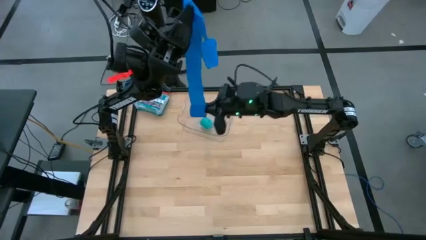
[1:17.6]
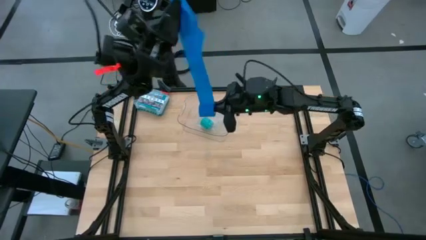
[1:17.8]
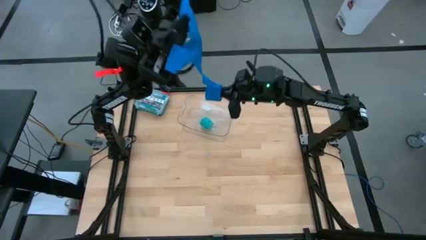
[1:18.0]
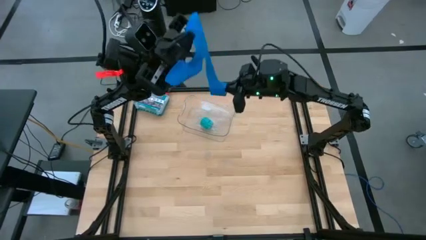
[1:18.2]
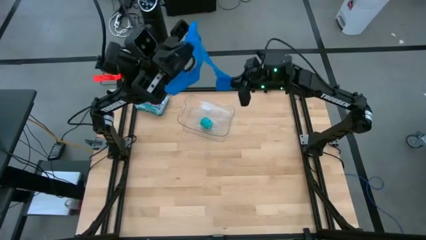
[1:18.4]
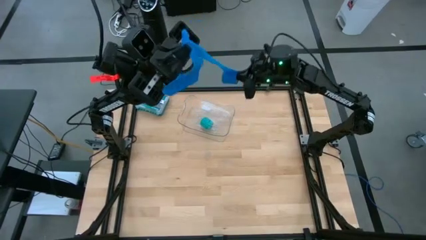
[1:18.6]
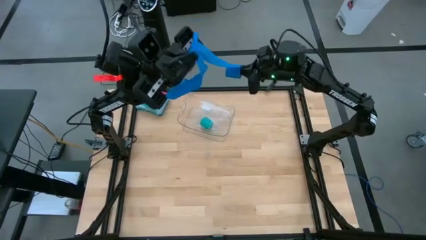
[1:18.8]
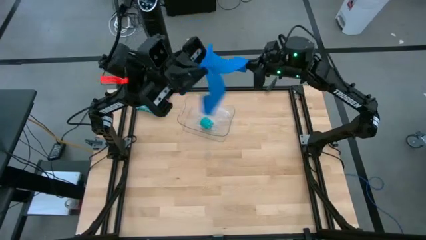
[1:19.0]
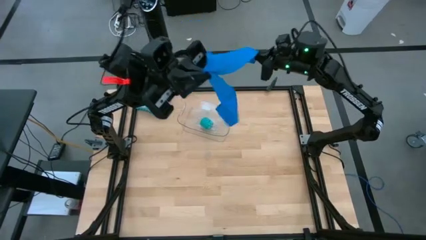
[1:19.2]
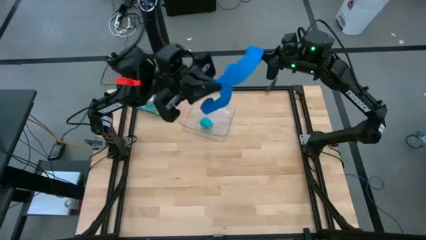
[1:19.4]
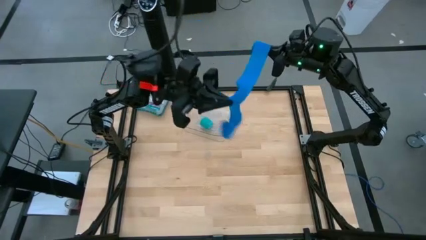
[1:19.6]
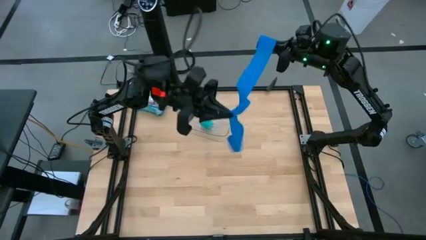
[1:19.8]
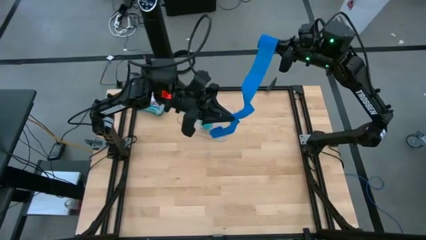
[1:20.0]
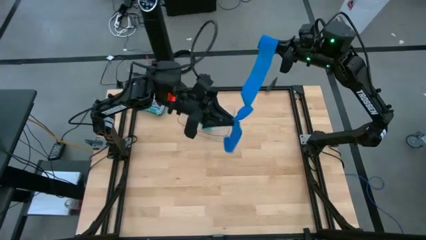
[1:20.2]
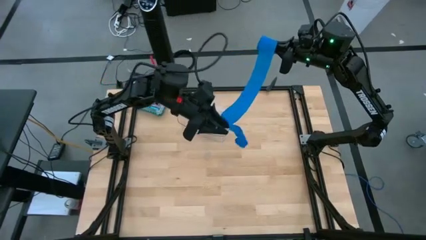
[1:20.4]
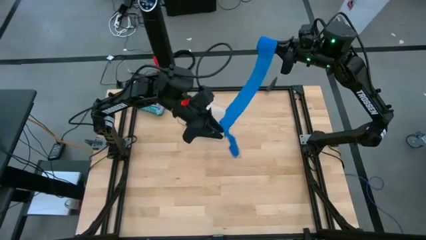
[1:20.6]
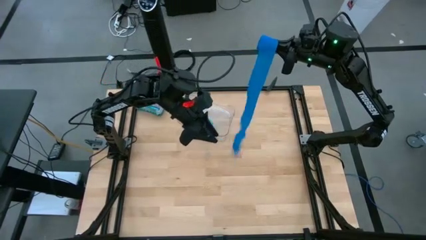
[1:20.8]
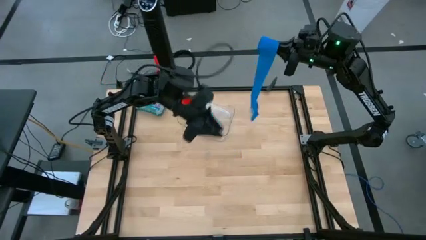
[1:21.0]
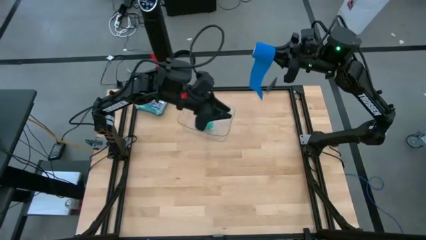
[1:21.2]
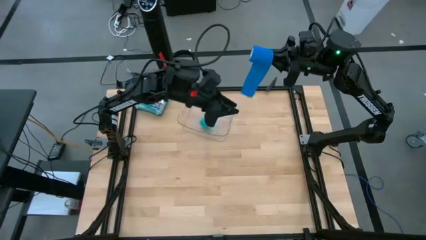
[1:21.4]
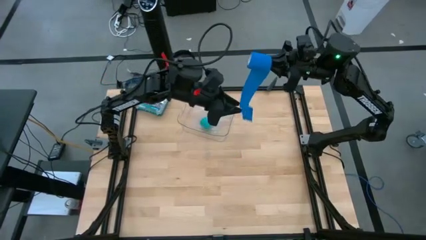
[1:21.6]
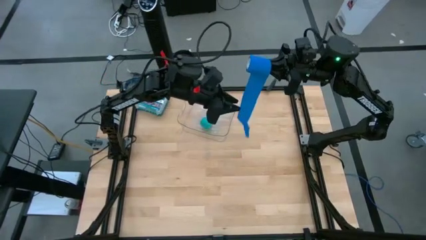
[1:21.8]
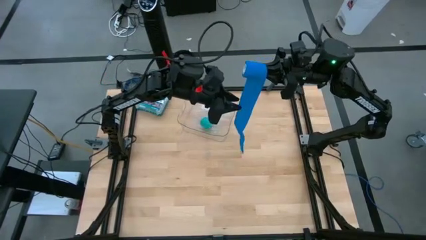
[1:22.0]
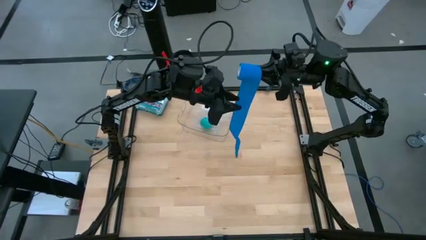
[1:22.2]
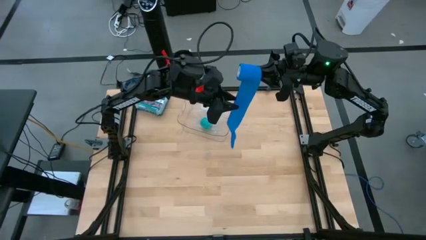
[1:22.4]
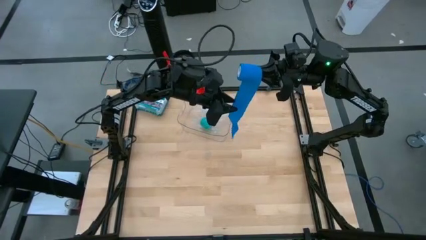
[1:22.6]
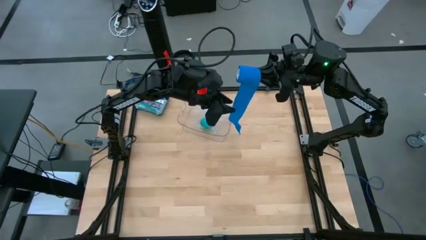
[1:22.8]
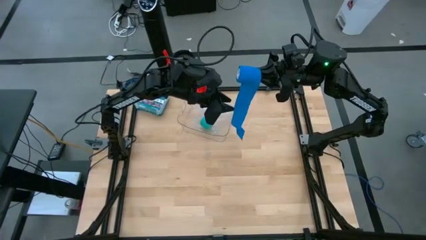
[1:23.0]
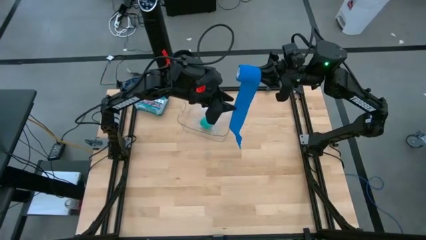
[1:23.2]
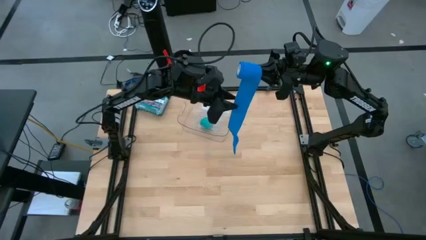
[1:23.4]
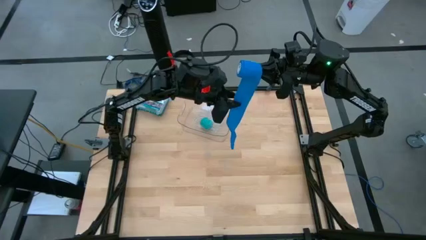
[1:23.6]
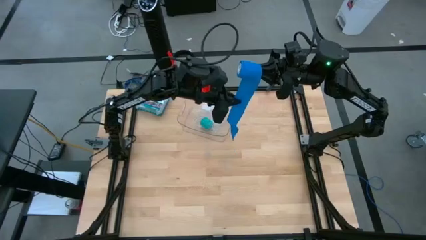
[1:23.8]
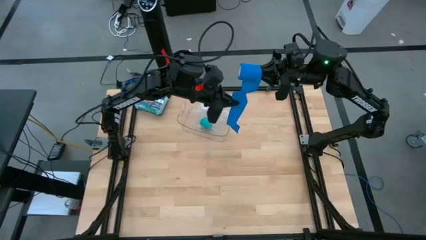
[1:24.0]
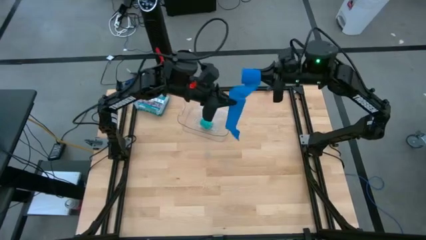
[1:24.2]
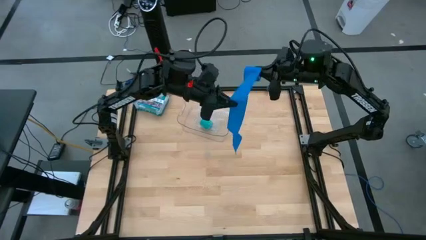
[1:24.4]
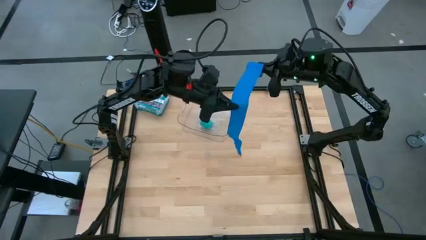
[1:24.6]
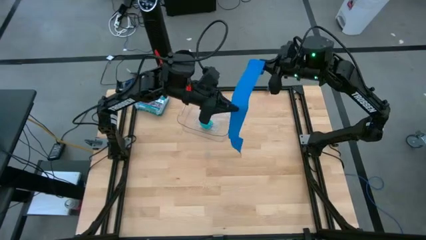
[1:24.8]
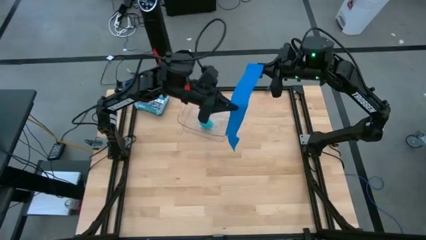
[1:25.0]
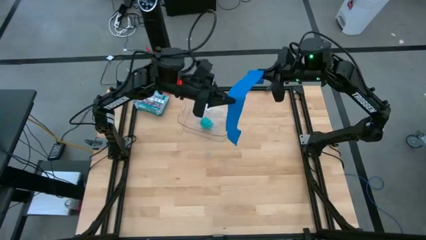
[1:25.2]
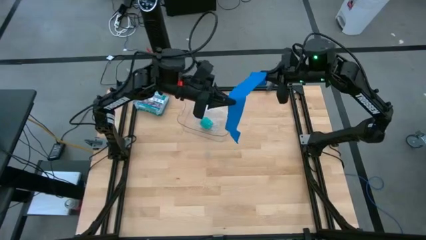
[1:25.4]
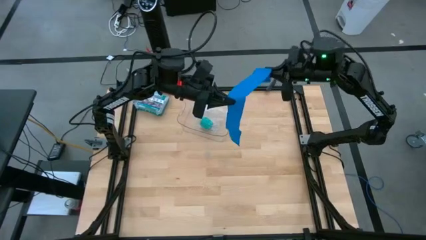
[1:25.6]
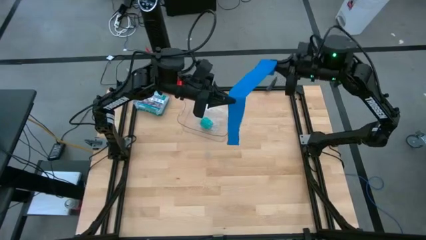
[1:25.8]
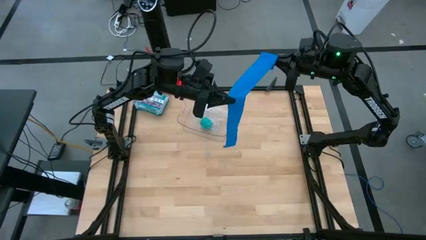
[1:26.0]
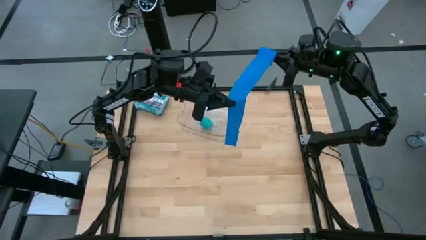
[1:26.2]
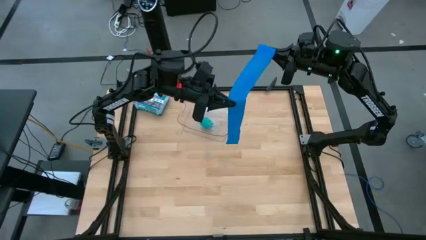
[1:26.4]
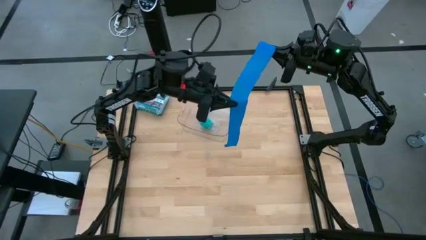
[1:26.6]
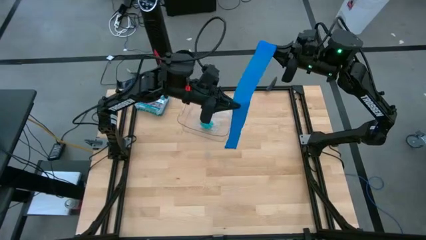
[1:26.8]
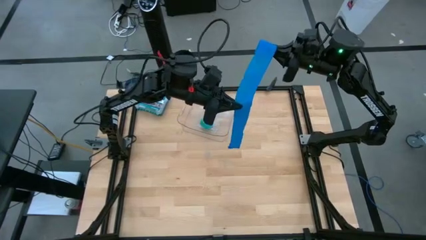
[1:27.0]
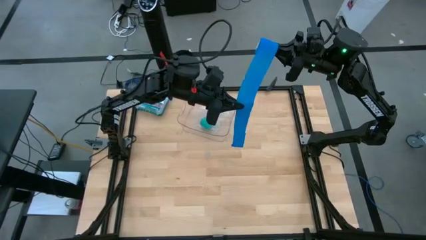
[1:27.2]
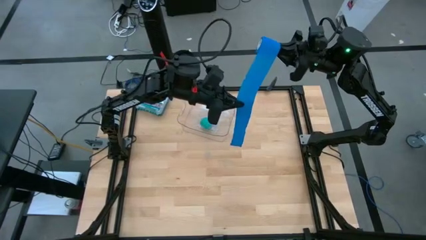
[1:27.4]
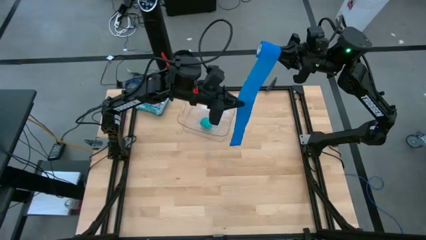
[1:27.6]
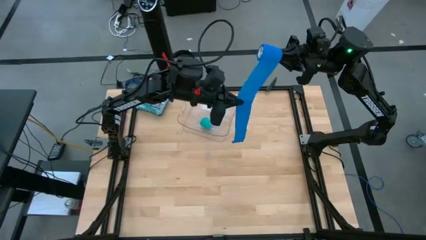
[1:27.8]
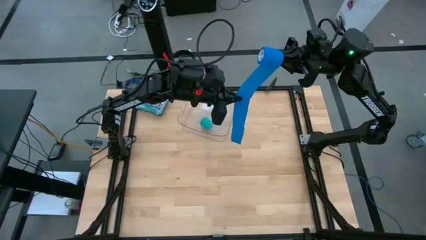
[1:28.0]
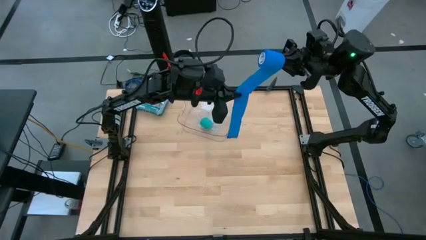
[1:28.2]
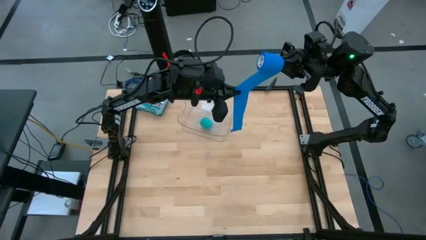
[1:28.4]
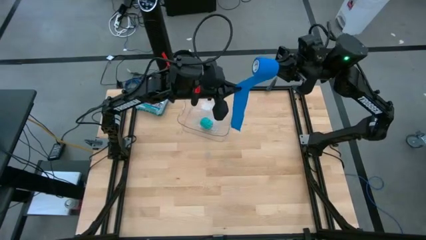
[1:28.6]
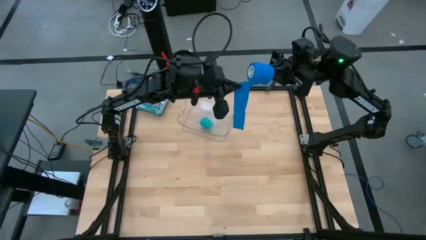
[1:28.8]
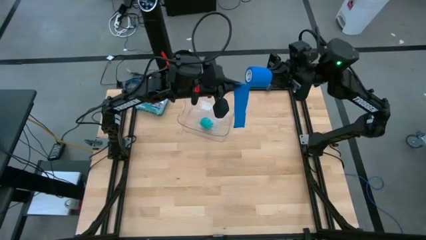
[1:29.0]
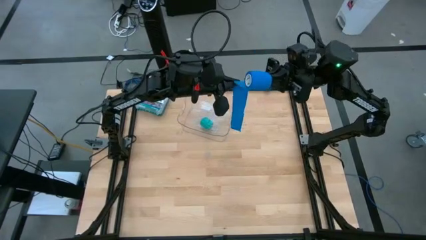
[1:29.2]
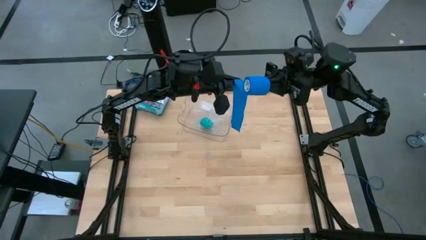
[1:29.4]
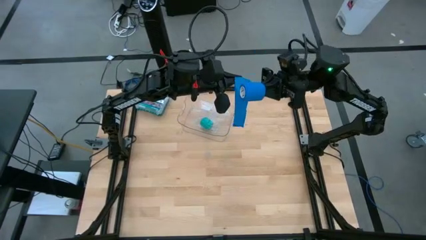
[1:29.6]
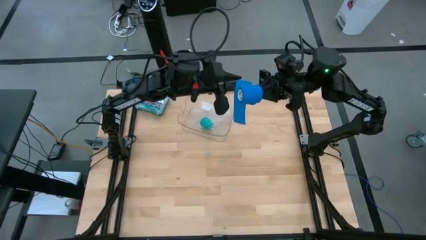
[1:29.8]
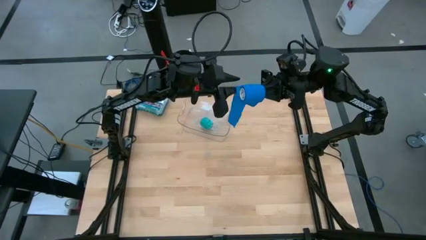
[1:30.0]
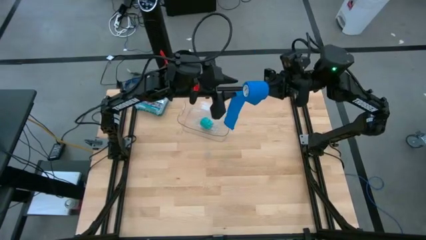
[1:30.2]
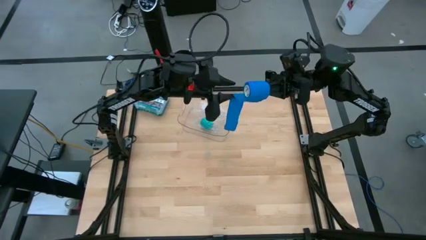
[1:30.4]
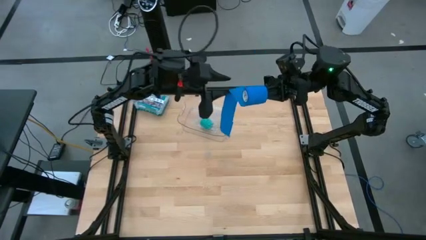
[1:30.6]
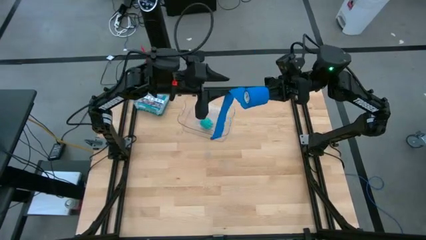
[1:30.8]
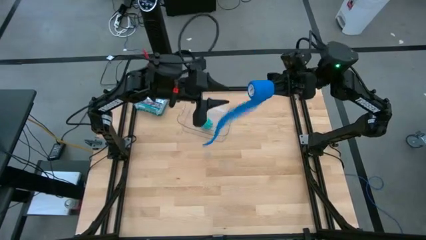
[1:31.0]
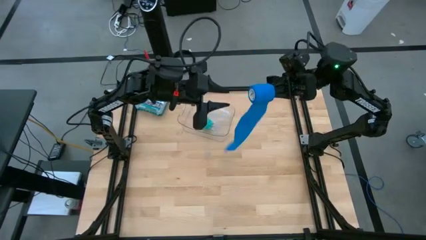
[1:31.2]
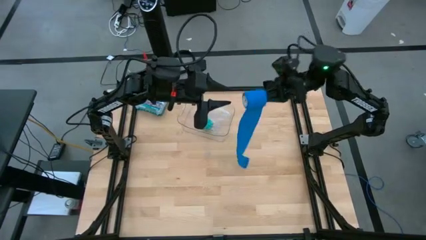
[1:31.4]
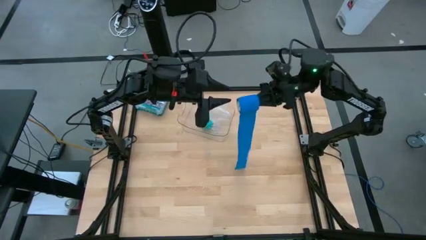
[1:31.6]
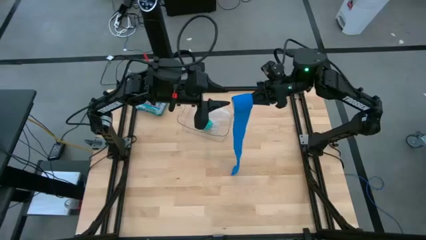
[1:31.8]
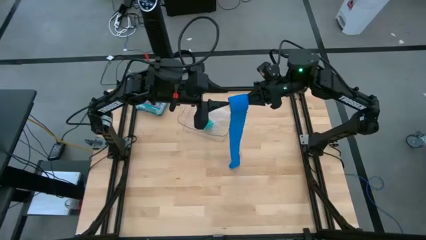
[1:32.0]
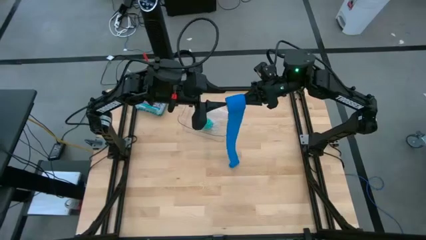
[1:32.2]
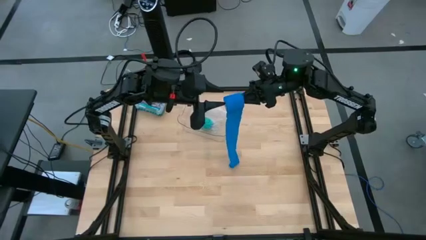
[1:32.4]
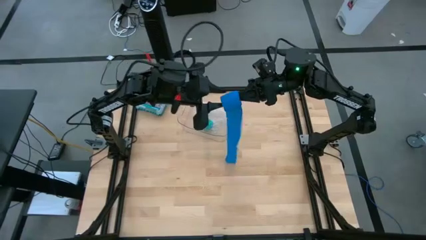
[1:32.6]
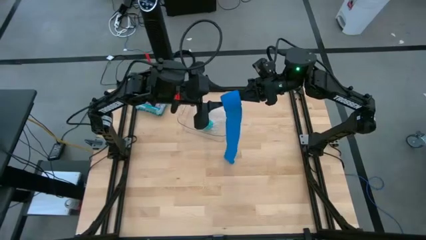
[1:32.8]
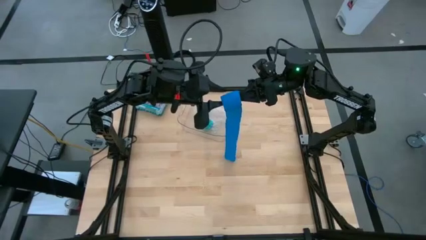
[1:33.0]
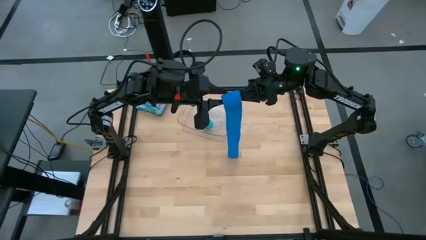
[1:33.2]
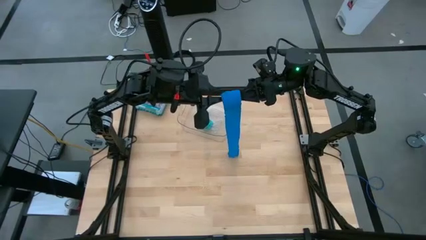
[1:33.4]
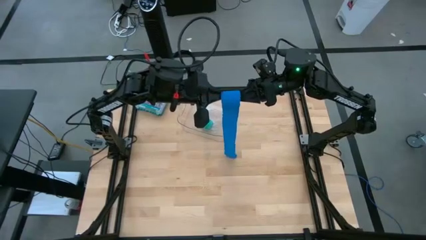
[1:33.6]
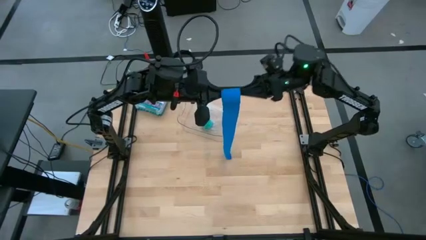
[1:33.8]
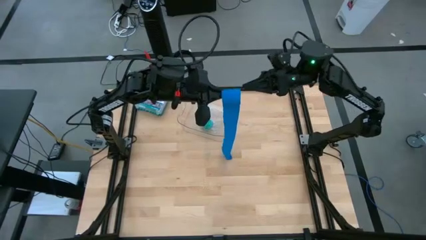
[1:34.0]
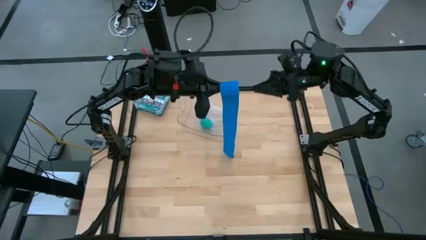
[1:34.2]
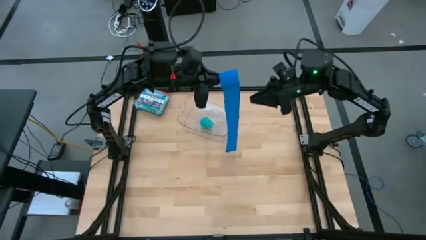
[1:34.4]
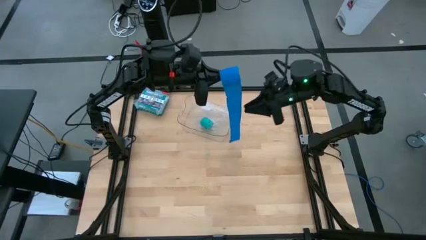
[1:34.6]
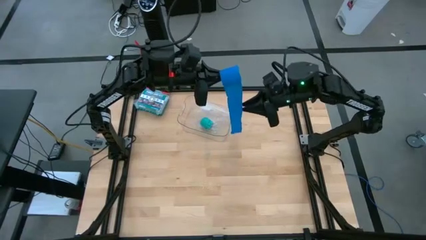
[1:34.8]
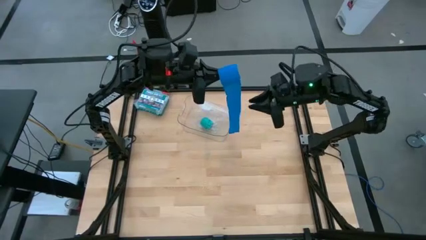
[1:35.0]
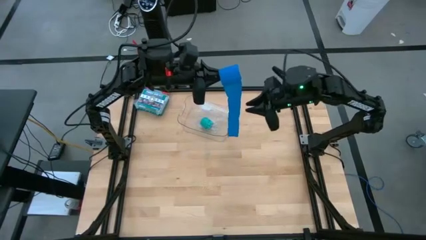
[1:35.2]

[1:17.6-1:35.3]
Task: Roll bandage
Roll the blue bandage
